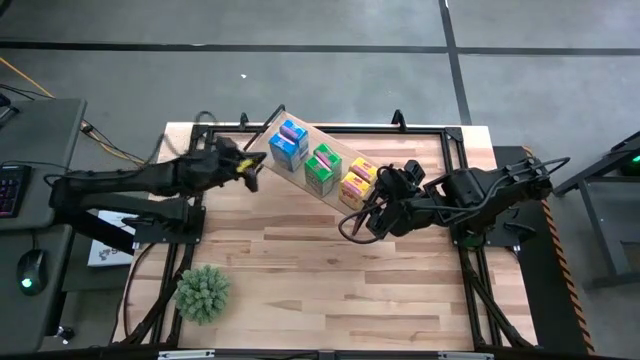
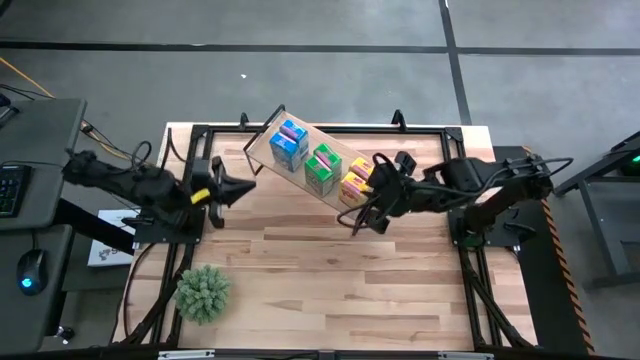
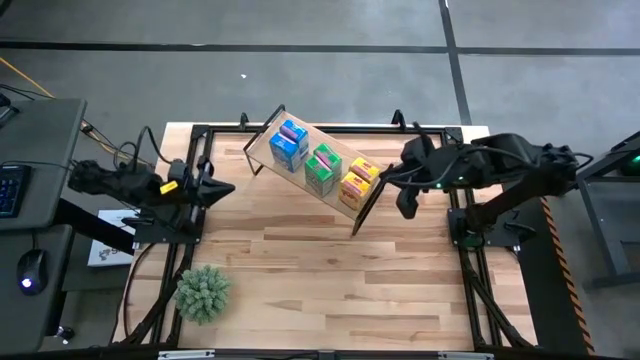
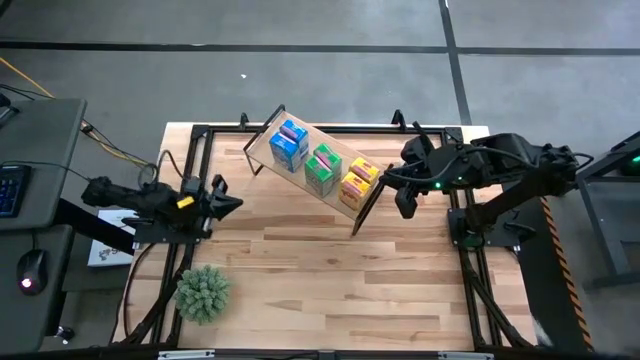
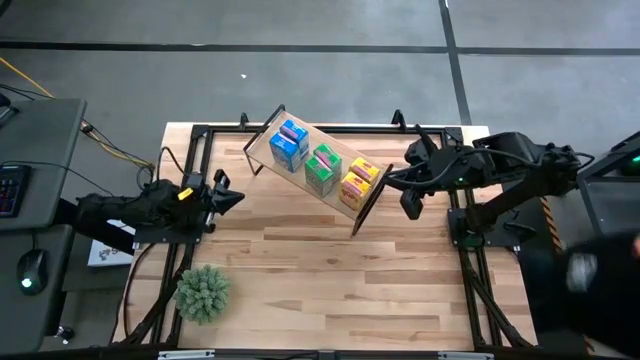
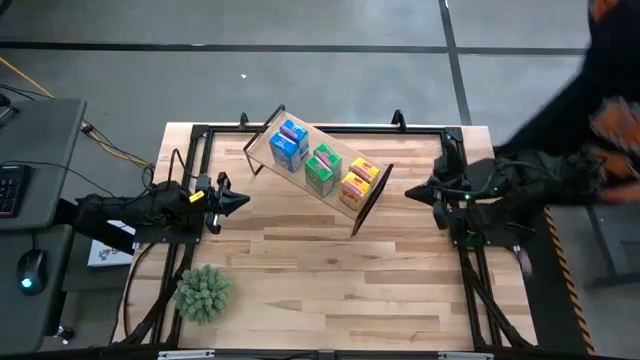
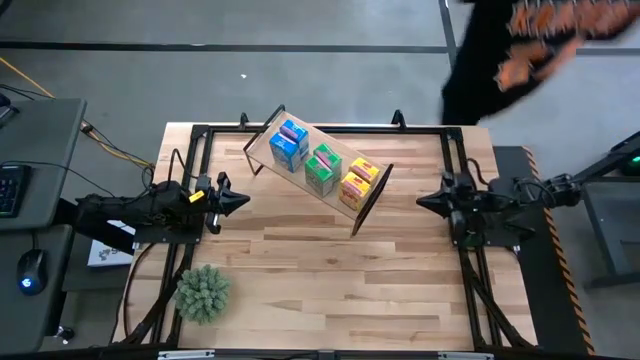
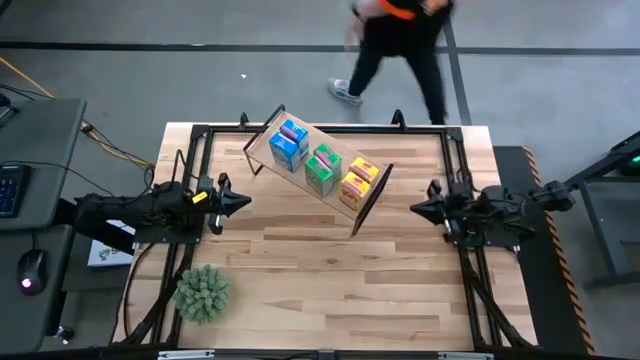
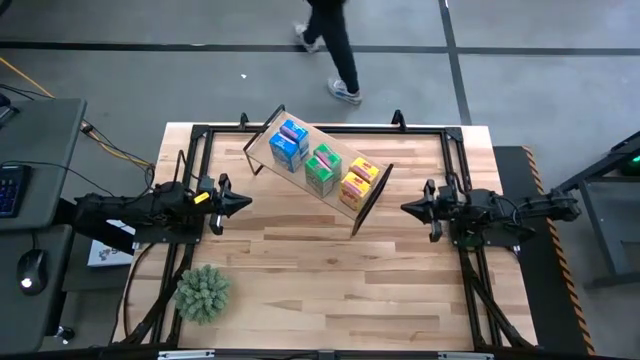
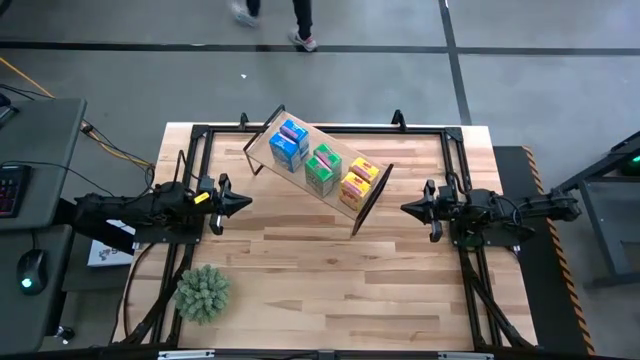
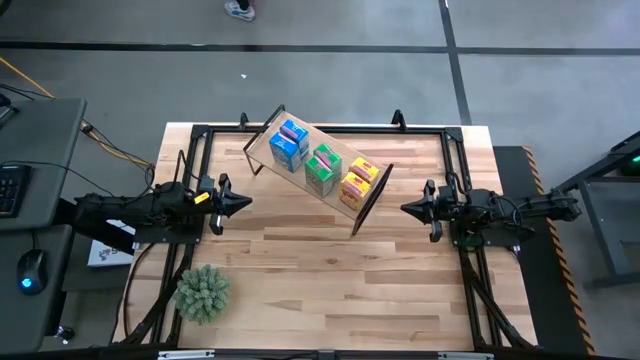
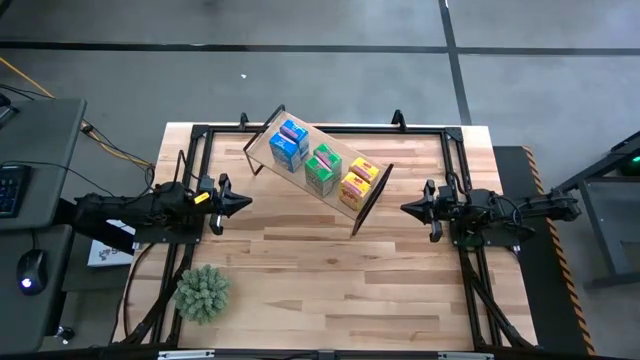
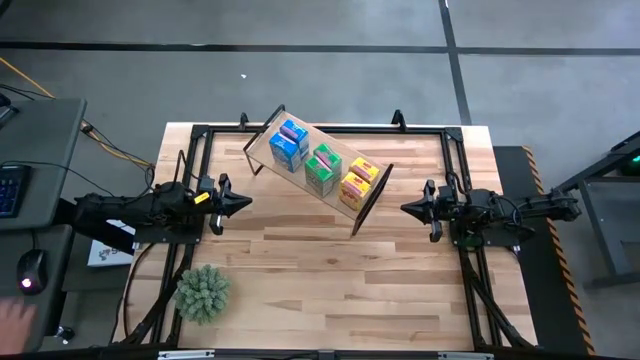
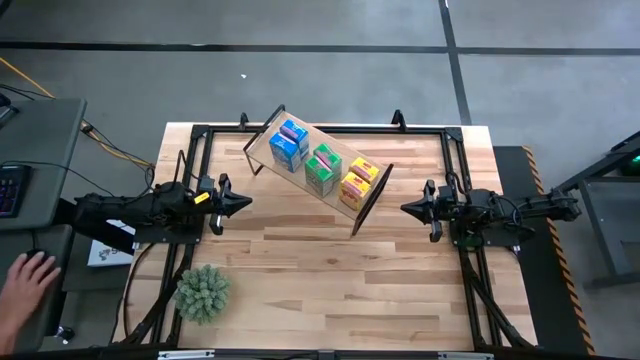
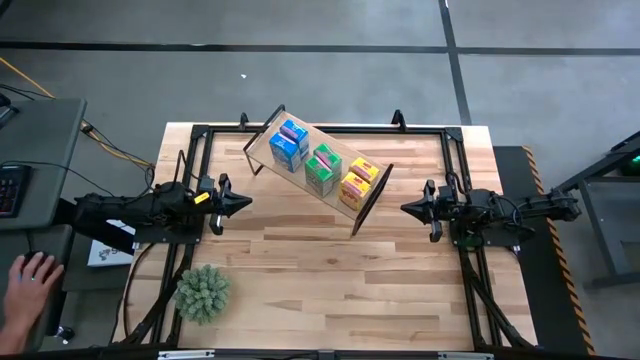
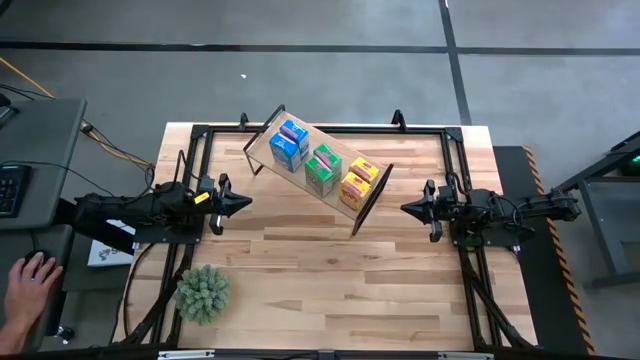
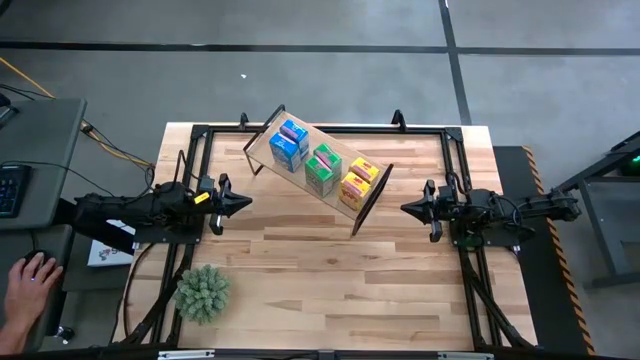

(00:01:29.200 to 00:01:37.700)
Task: Stack cereal on shelf
Return to Home Position

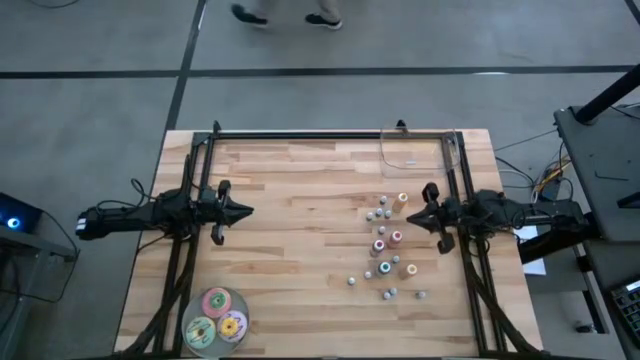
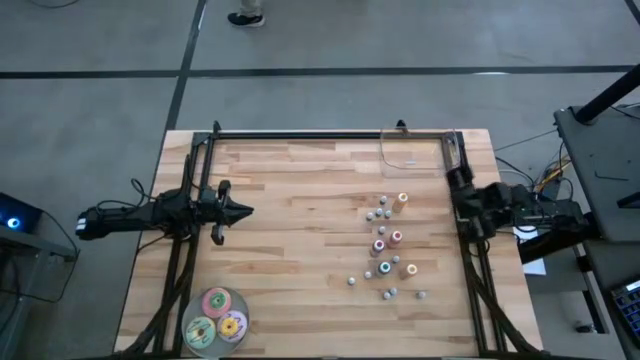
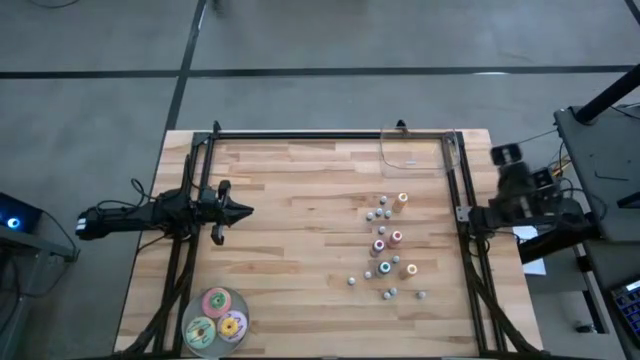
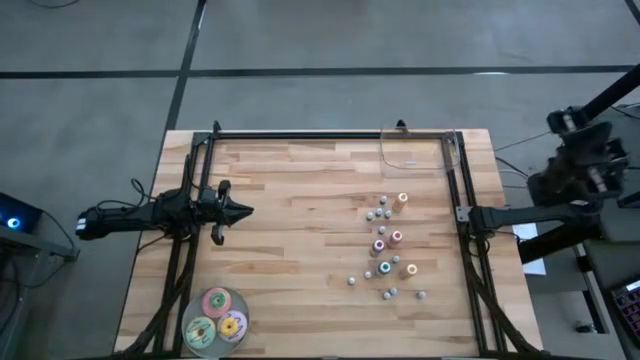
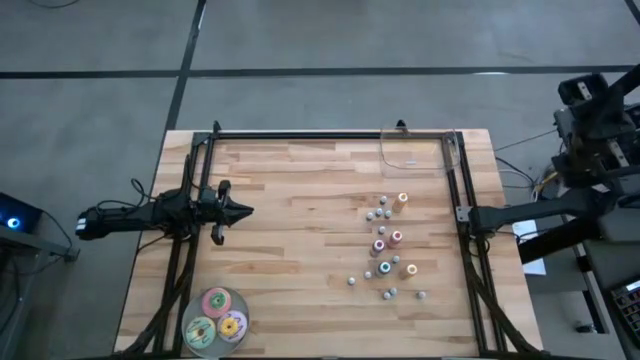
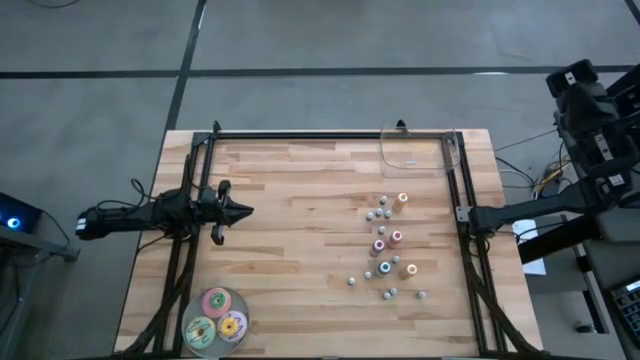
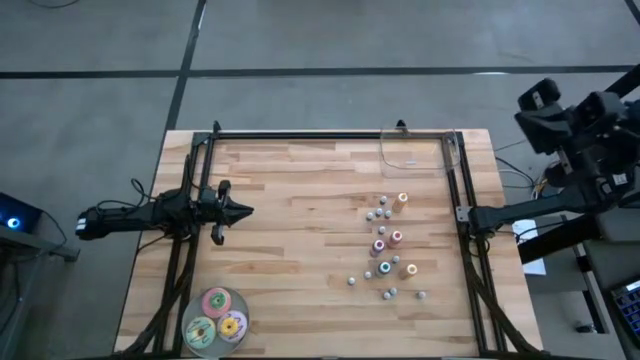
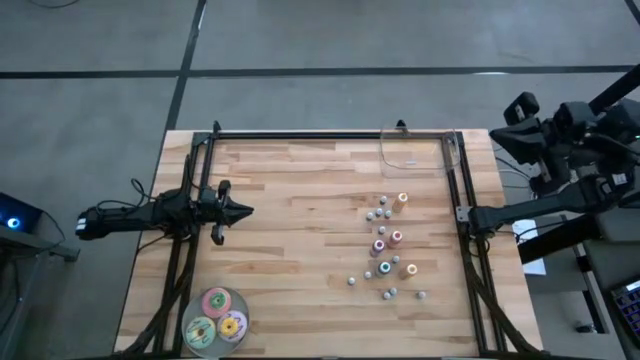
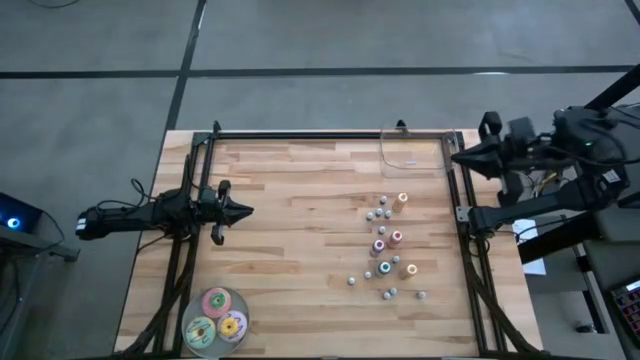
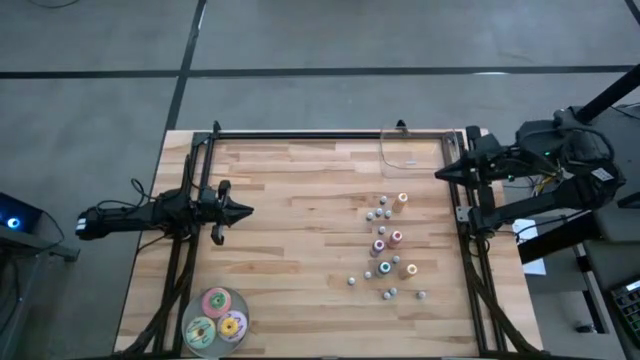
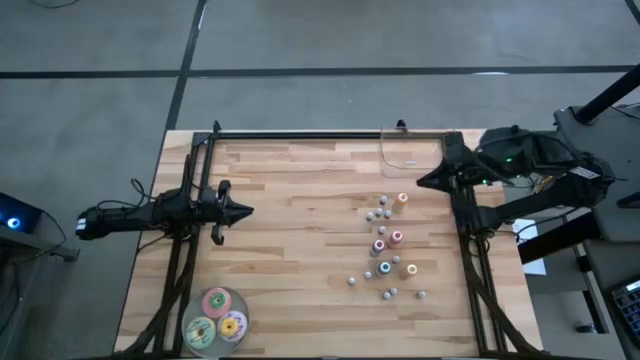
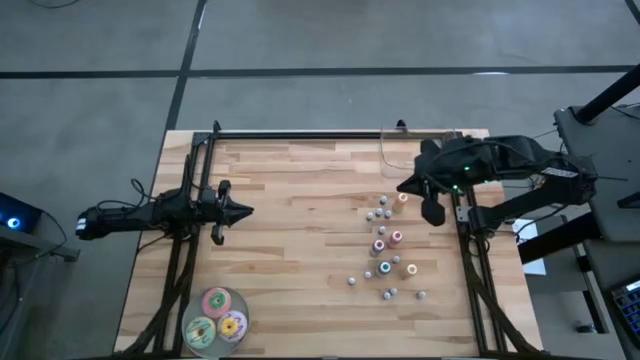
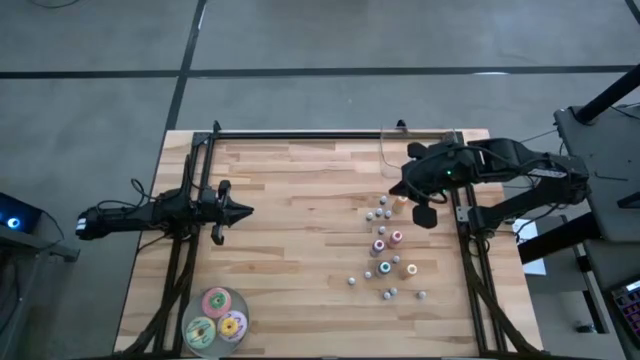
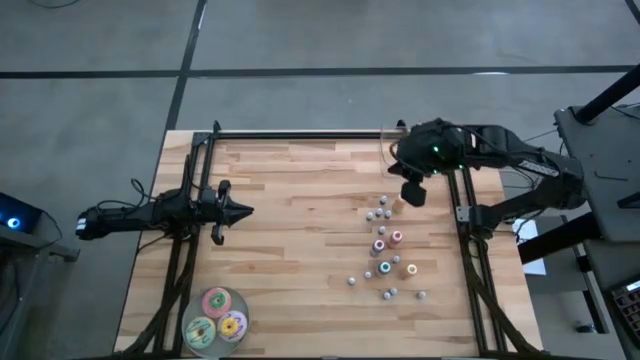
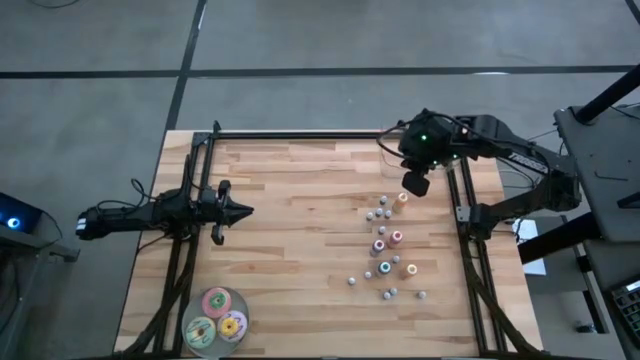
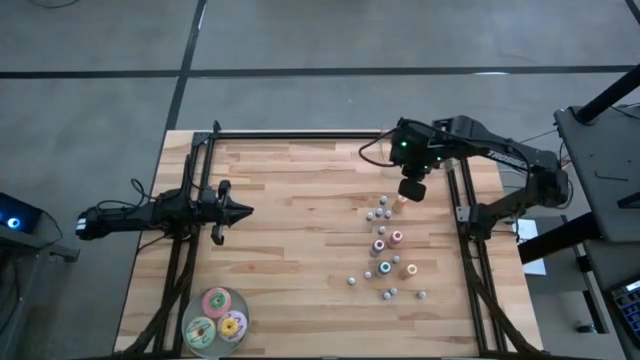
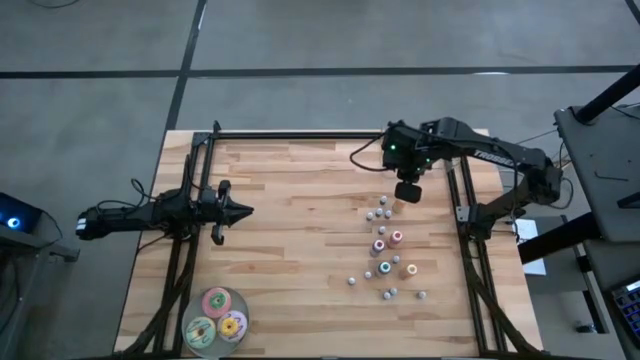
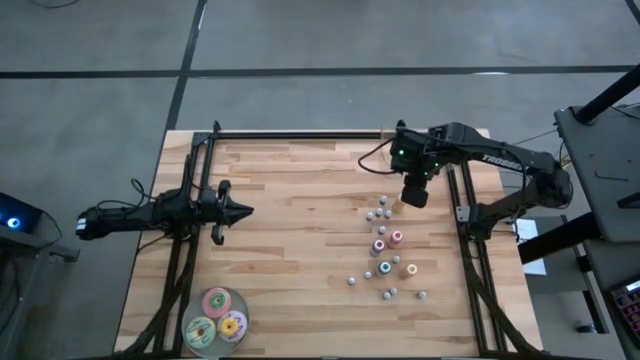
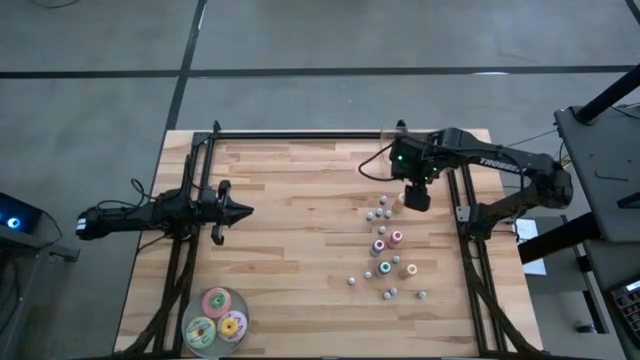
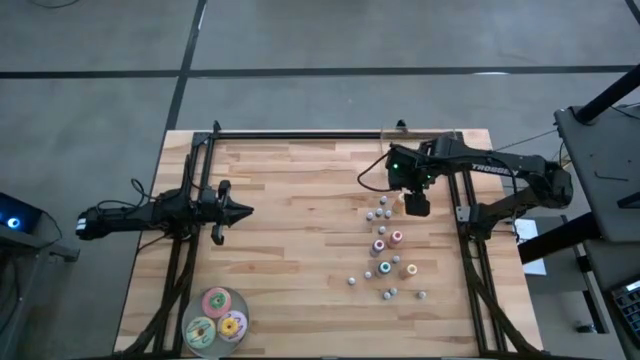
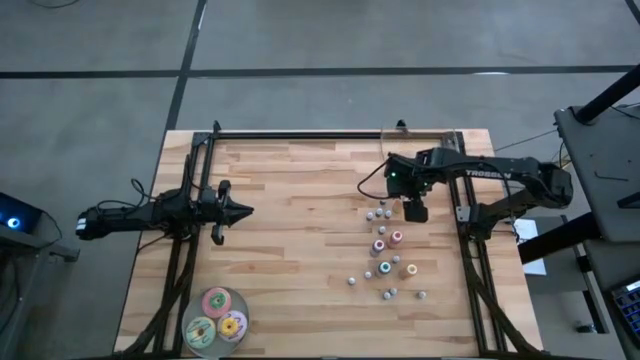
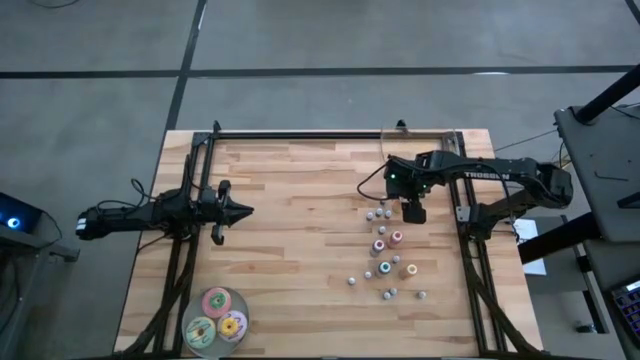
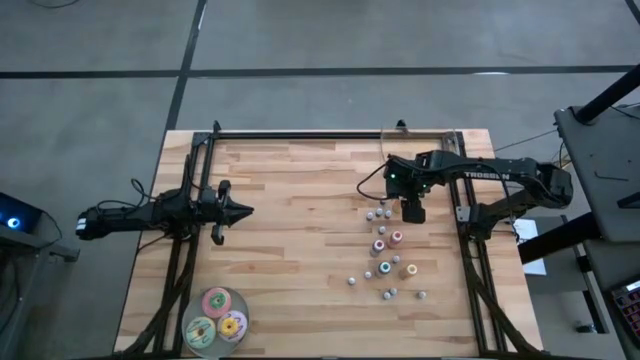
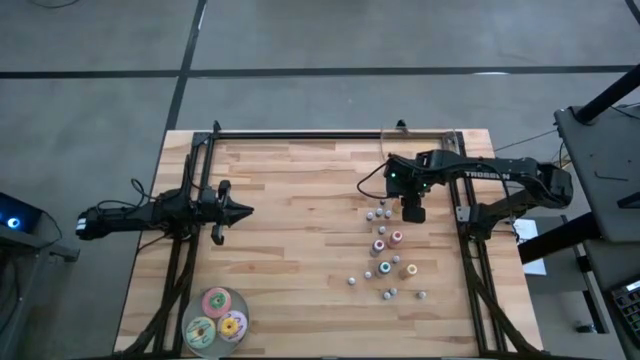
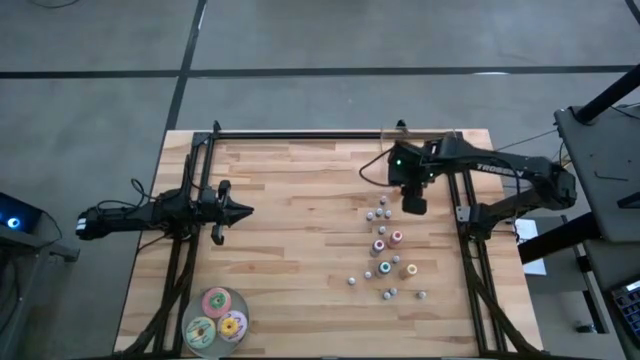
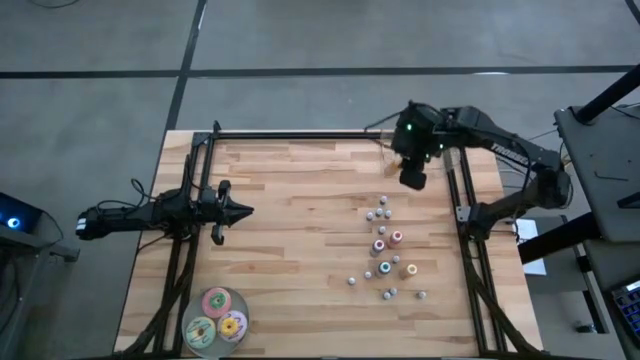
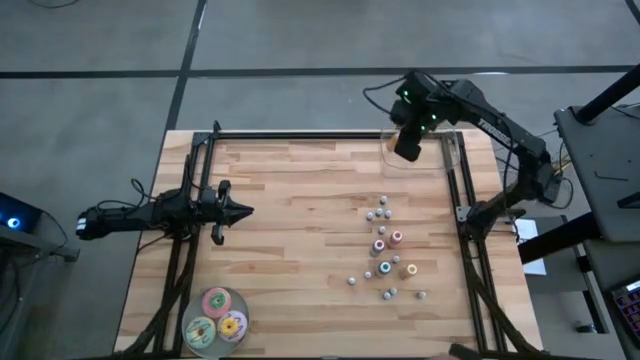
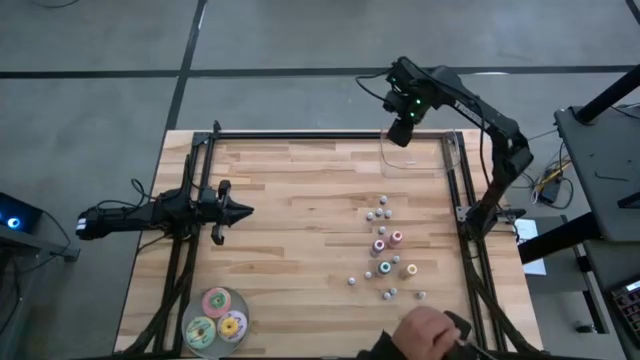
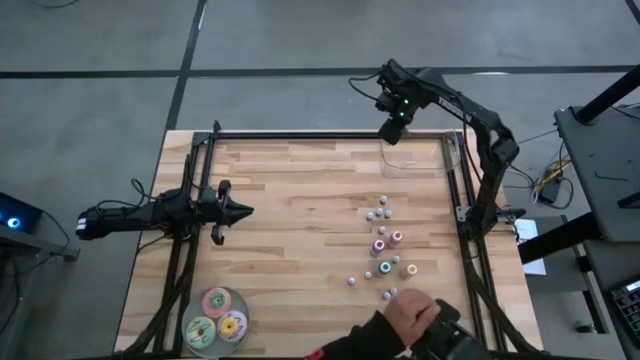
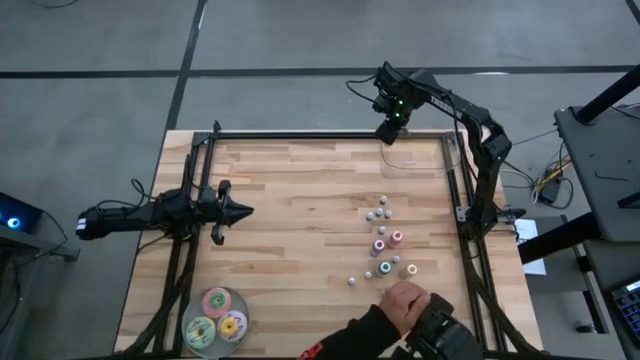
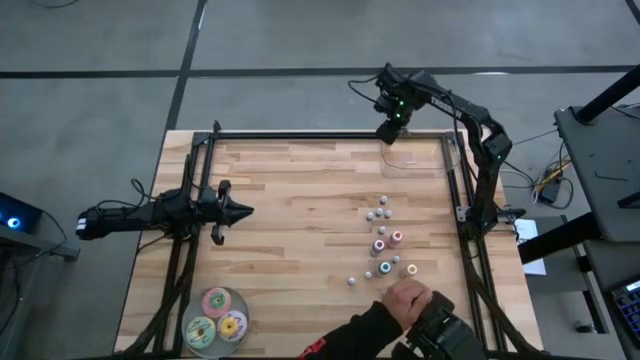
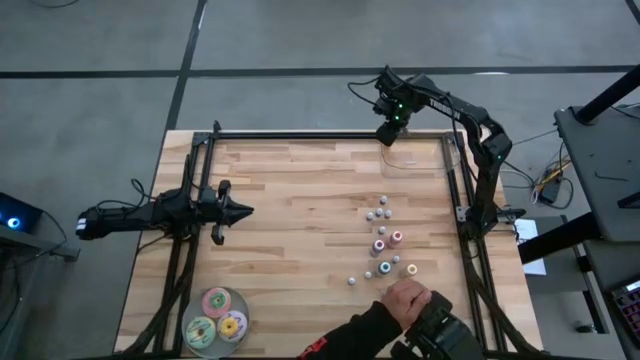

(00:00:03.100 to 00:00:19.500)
Task: Pick & Place food coloring
Put the top yellow big food coloring bottle into the bin
